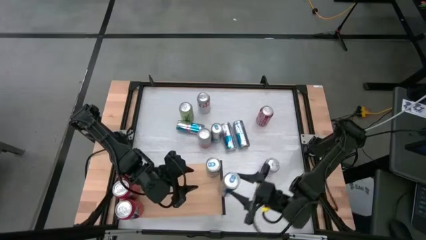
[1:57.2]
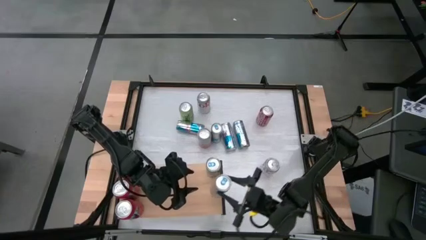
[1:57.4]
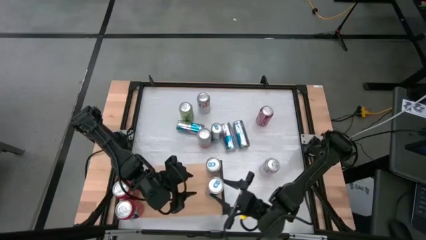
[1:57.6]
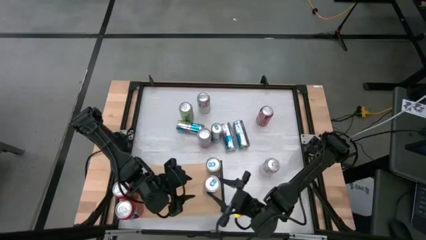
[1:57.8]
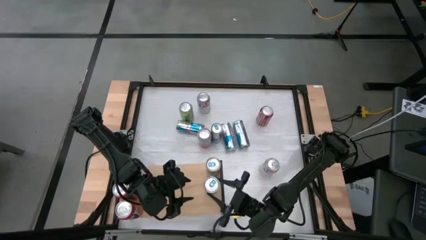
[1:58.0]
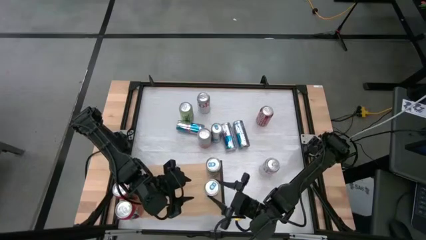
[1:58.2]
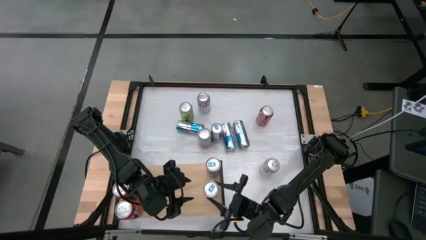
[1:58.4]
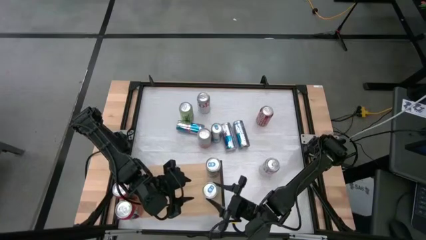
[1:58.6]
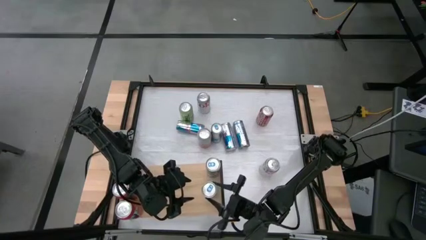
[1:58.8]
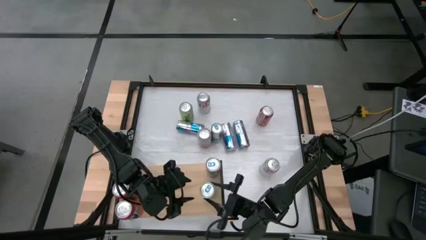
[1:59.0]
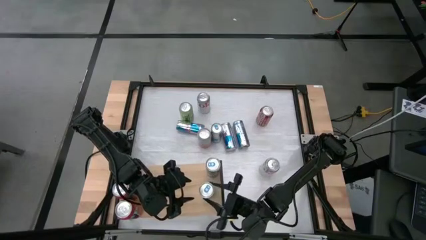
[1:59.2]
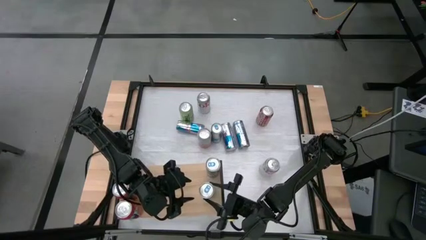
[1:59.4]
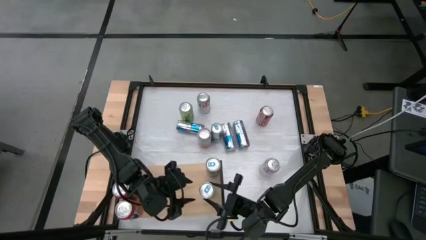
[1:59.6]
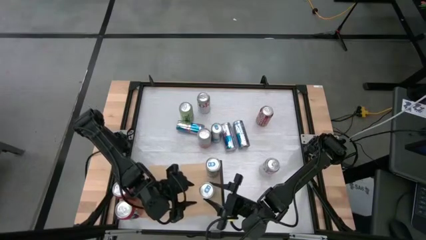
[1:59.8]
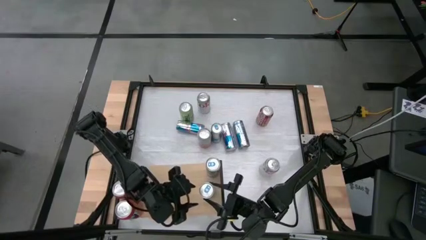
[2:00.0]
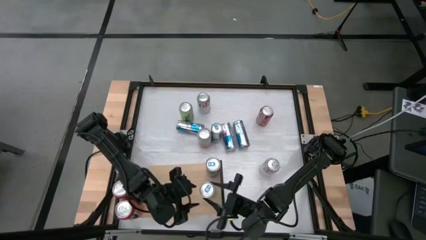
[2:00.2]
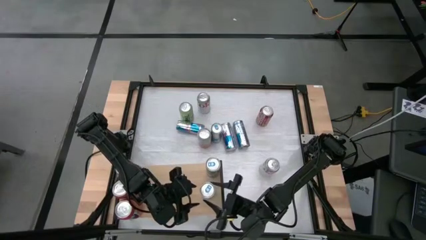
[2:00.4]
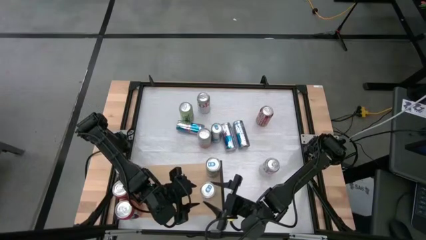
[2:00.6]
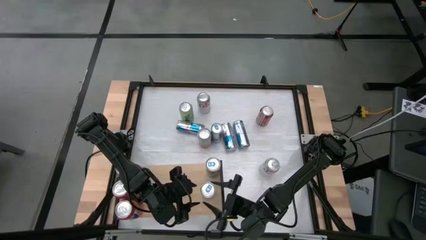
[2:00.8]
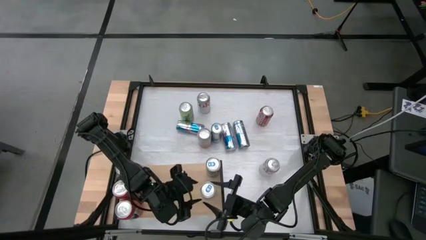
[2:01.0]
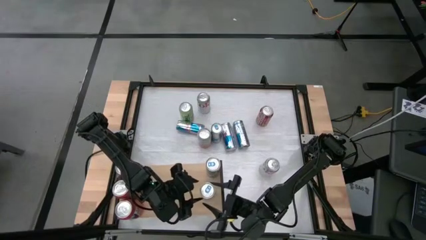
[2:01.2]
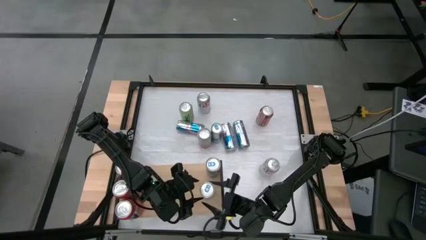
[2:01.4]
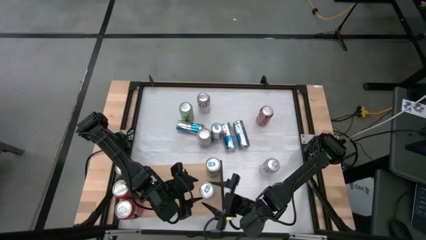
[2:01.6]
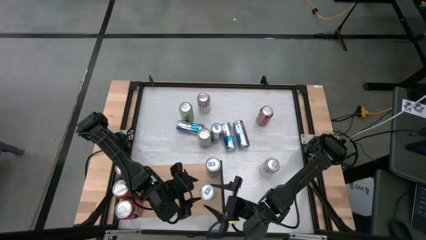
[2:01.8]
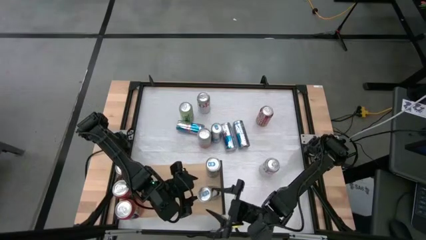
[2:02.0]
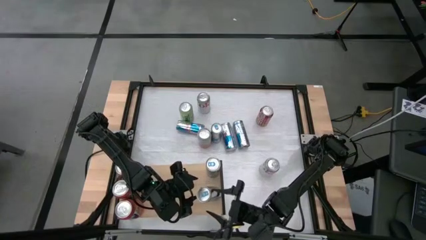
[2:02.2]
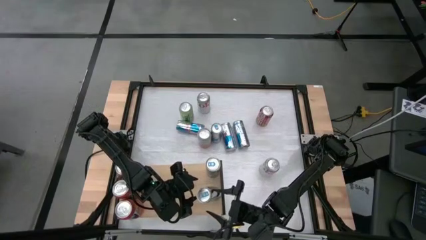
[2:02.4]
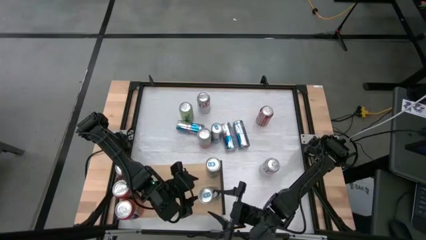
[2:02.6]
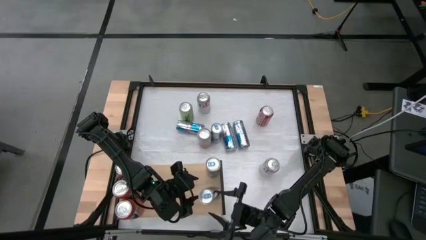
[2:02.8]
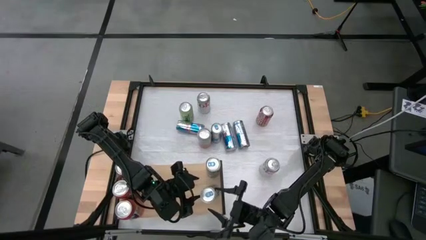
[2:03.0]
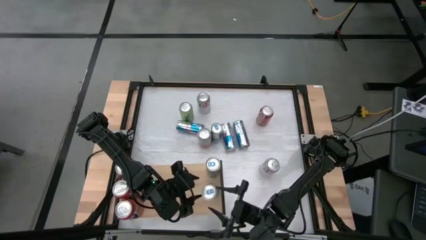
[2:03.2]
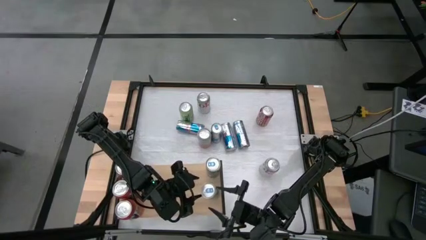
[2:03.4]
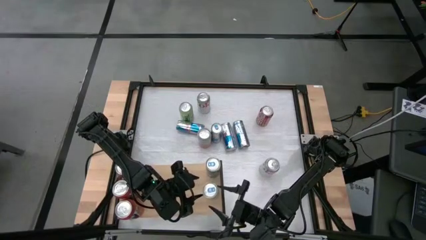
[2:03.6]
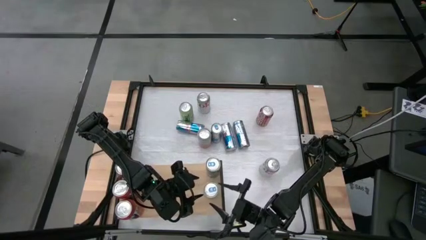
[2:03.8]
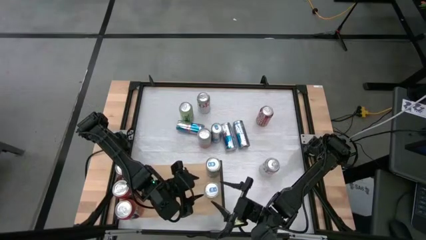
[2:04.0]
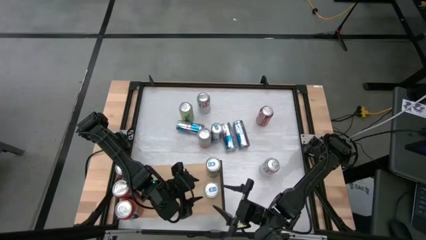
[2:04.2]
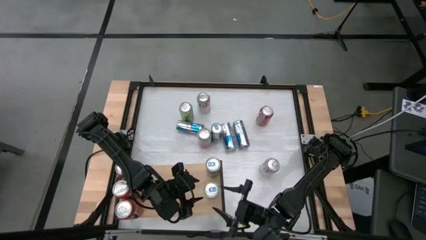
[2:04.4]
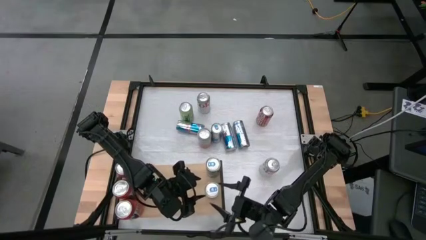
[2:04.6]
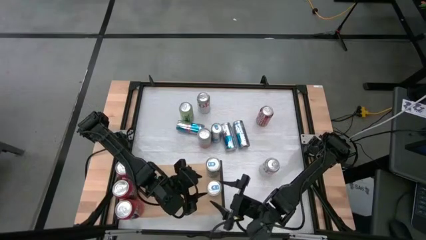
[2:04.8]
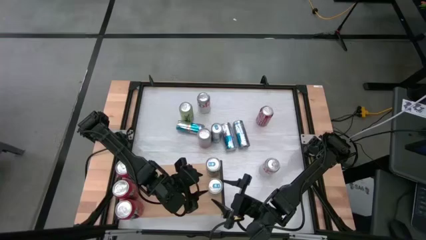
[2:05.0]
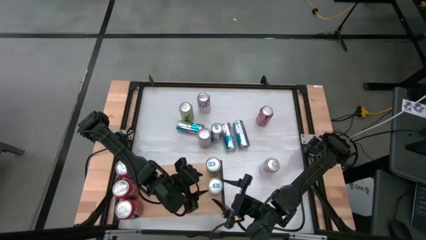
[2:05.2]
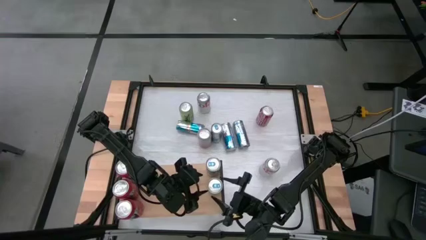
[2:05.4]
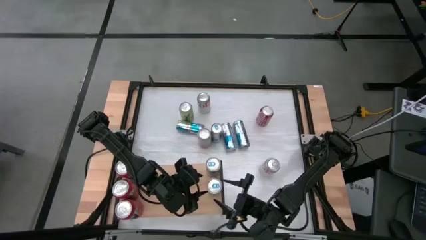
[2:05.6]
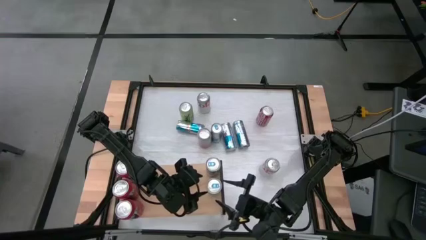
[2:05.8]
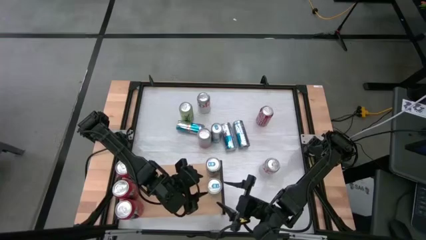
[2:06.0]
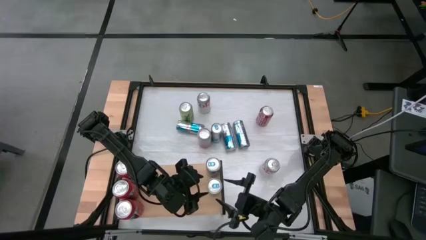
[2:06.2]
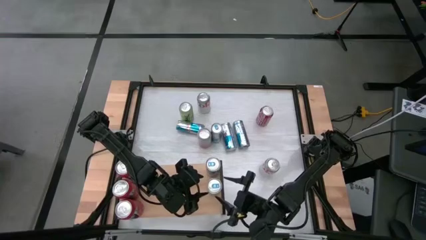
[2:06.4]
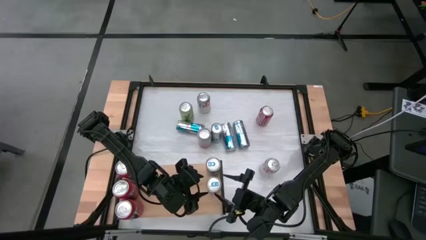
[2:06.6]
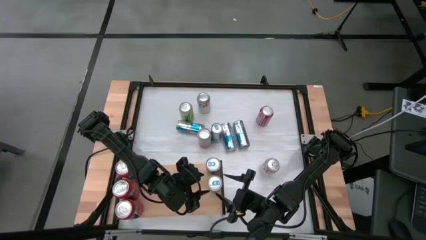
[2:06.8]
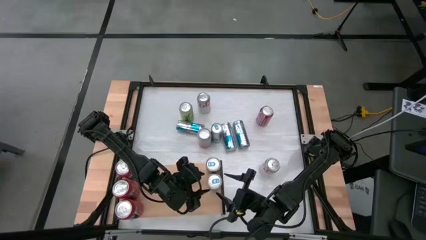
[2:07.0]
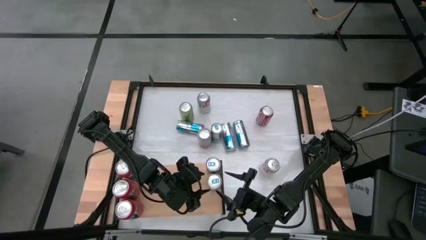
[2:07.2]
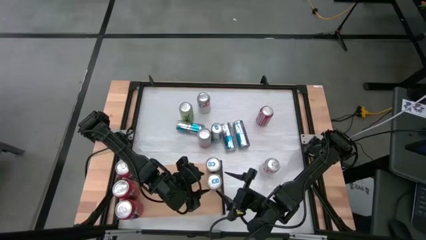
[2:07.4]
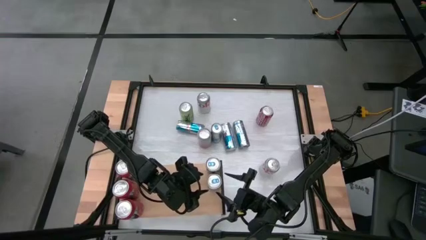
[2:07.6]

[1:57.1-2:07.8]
Task: Place canned beverage on shelf
Put the blue soda can on the shelf aligned with the blue soda can

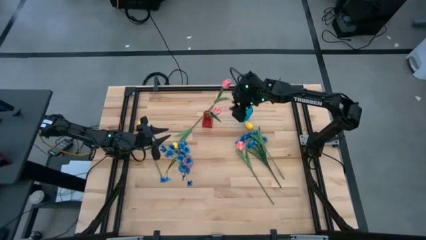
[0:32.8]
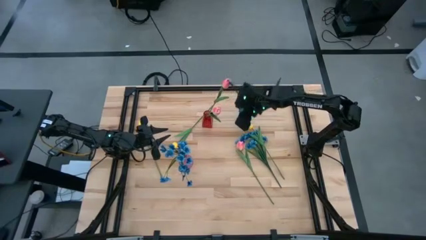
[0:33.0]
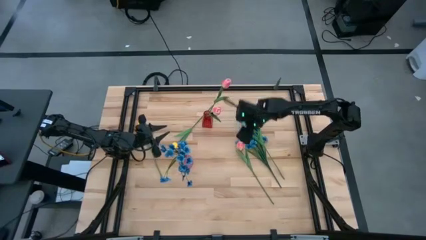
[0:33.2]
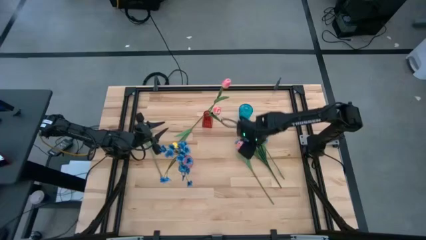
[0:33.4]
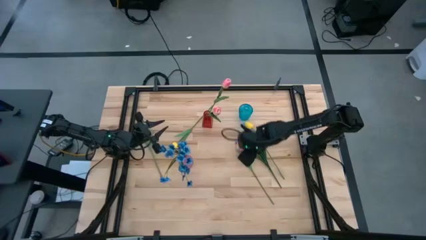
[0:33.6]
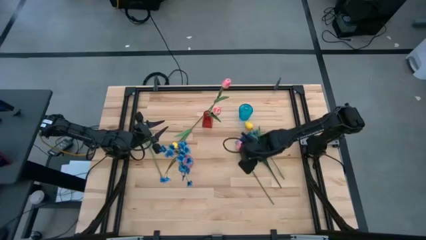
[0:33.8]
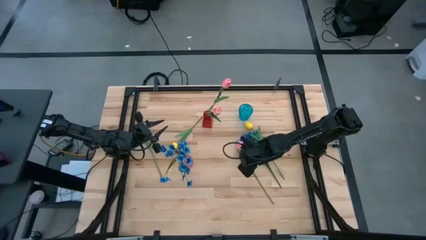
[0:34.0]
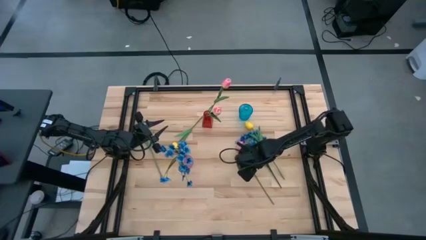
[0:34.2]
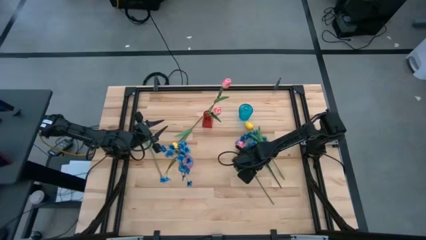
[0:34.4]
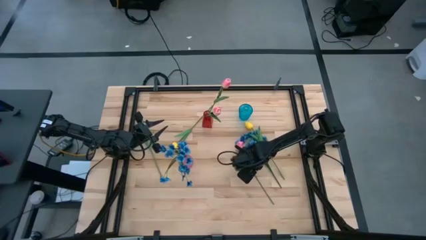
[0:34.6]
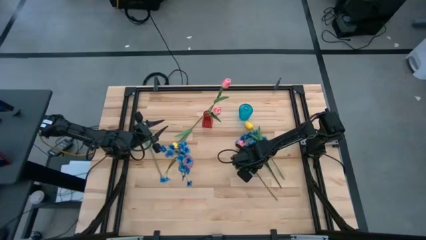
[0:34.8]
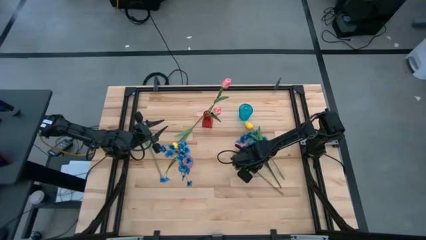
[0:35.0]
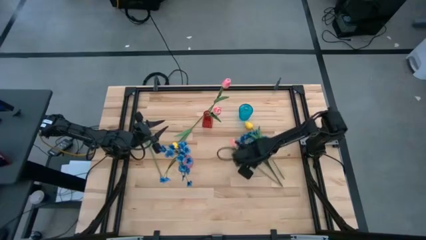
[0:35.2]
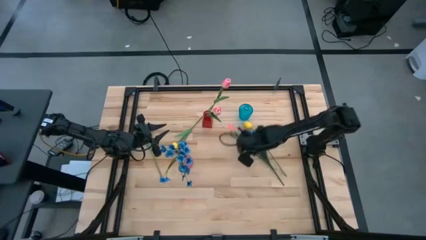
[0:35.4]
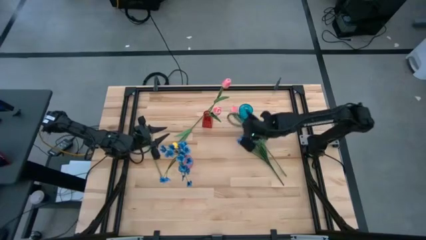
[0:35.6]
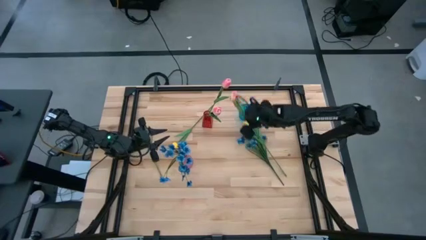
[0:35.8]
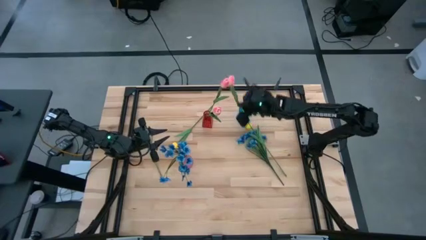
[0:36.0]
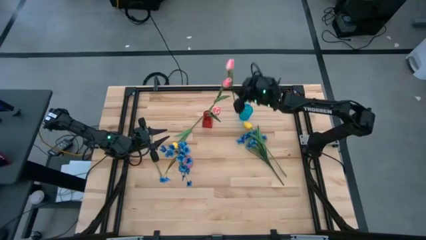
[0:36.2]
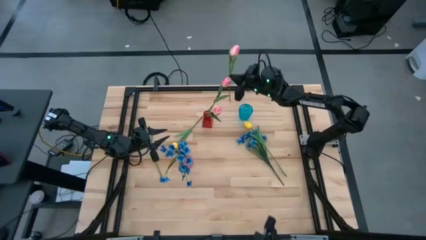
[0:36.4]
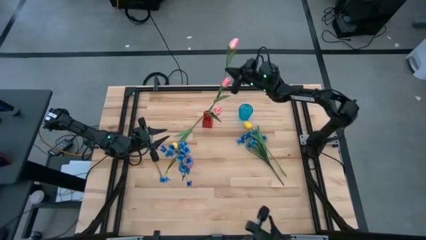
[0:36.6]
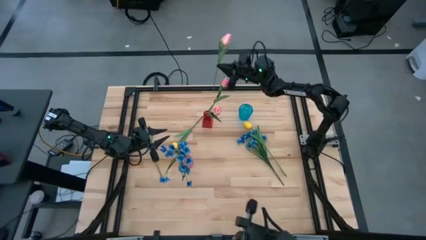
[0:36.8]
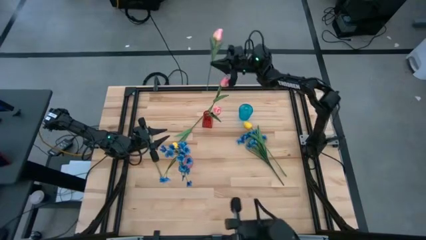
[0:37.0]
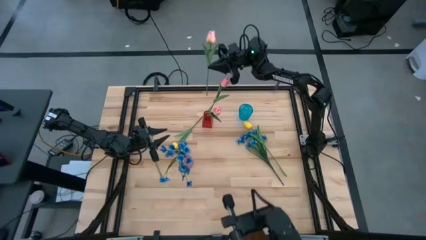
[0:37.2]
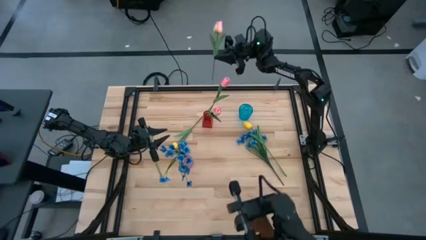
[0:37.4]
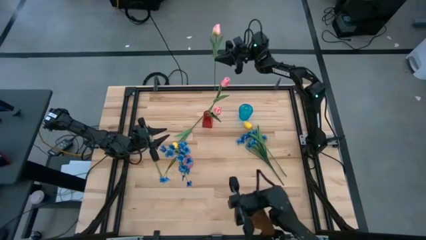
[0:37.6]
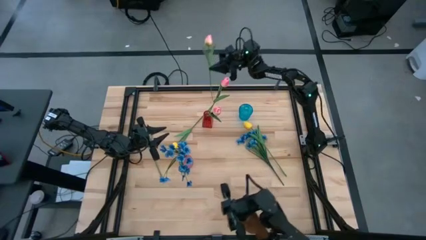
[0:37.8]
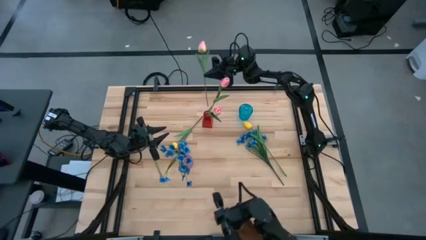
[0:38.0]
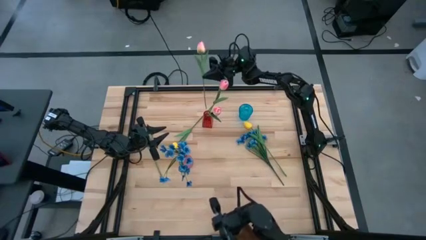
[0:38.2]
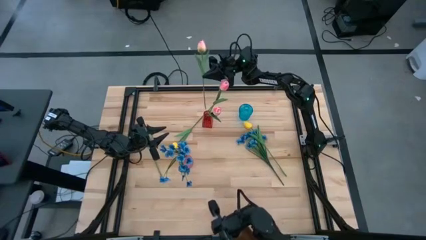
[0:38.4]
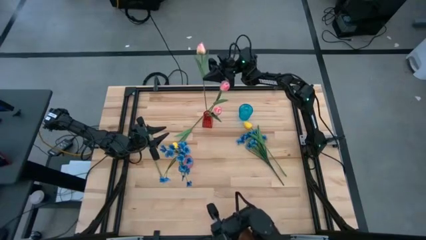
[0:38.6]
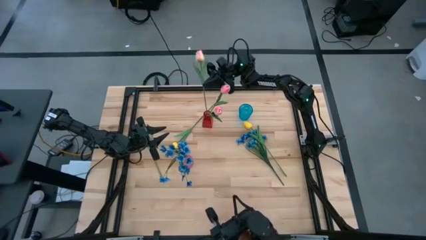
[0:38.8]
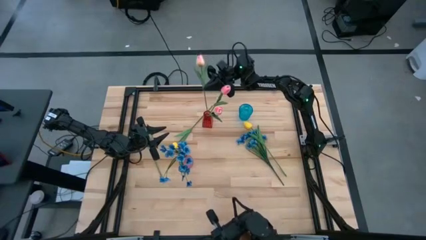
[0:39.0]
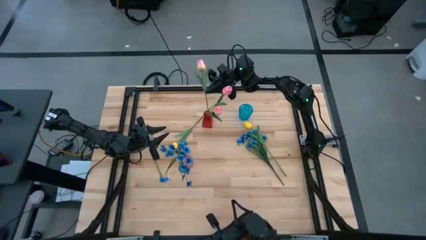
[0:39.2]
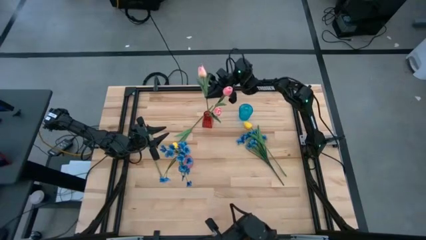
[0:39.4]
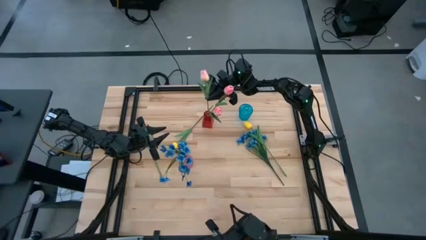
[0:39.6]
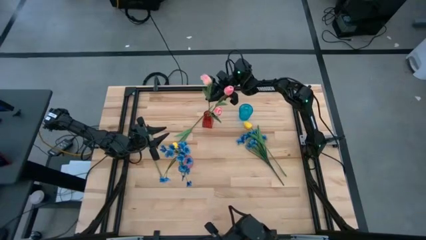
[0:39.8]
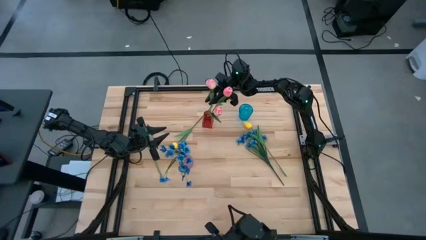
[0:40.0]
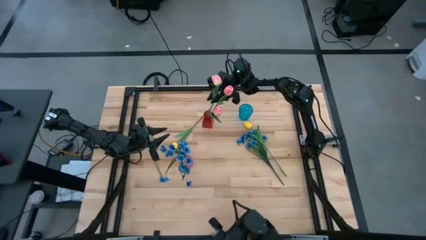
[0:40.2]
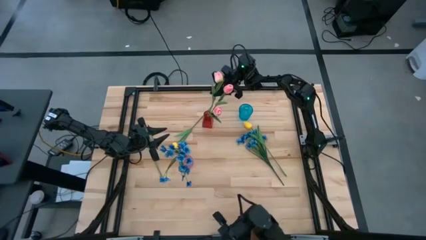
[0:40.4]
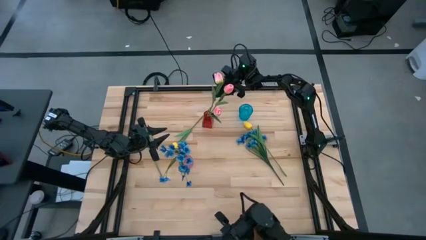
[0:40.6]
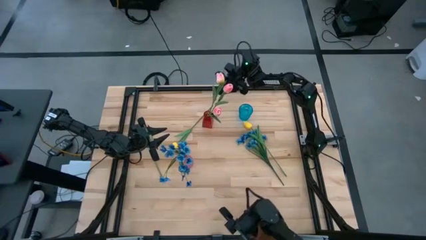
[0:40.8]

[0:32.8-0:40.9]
Task: Sort flowers into vase by color
Put the pink flower into the red vase
